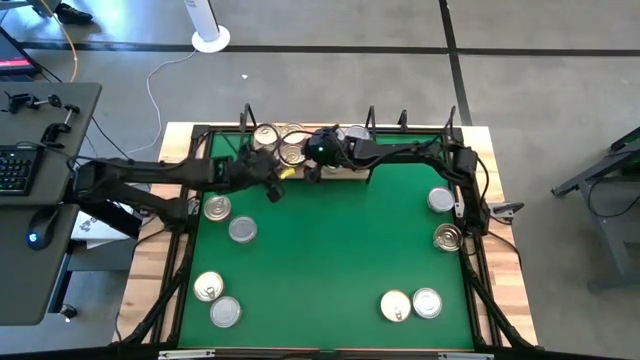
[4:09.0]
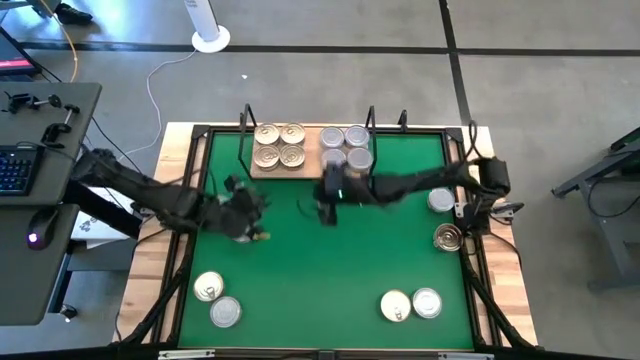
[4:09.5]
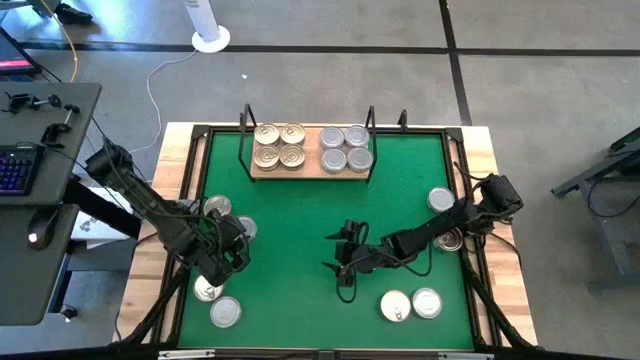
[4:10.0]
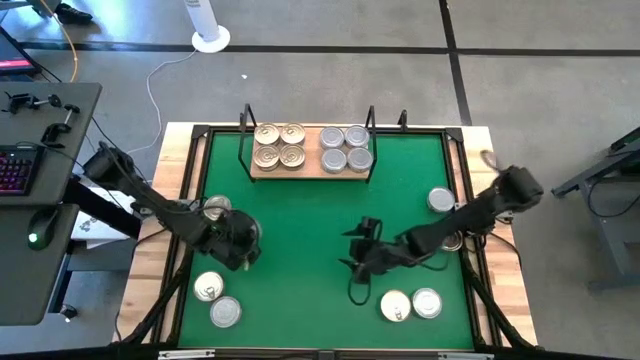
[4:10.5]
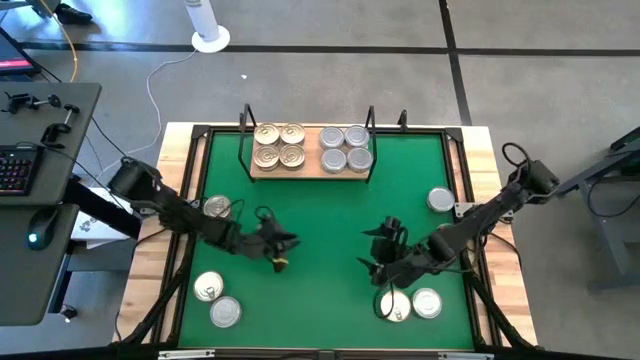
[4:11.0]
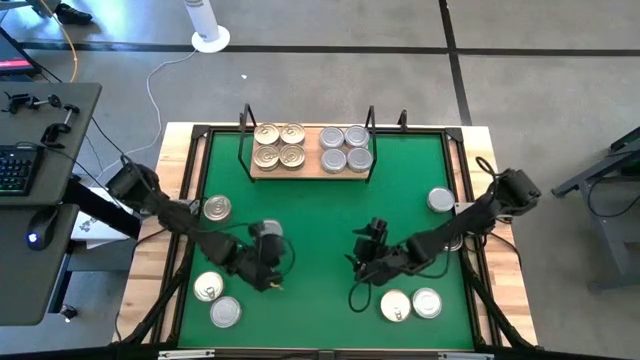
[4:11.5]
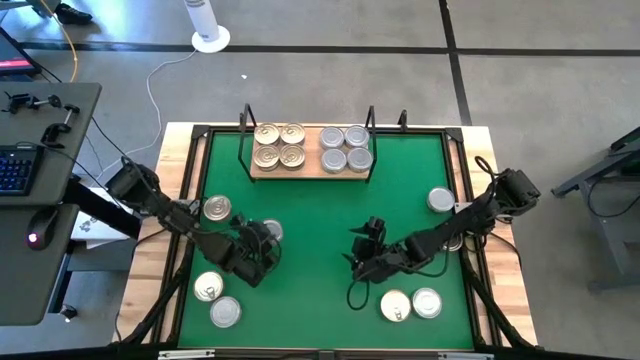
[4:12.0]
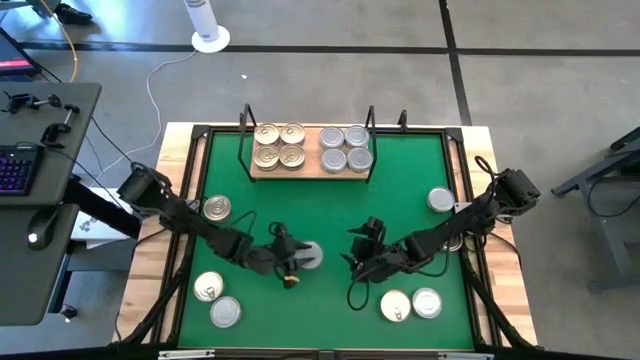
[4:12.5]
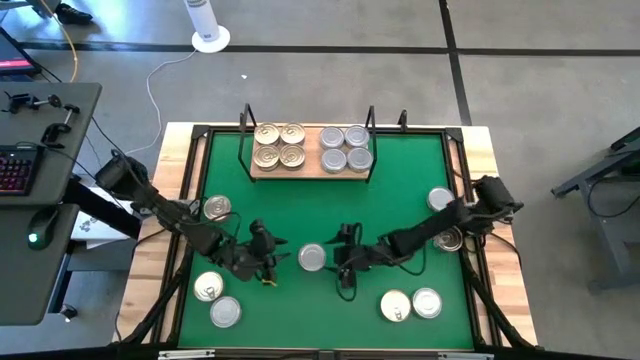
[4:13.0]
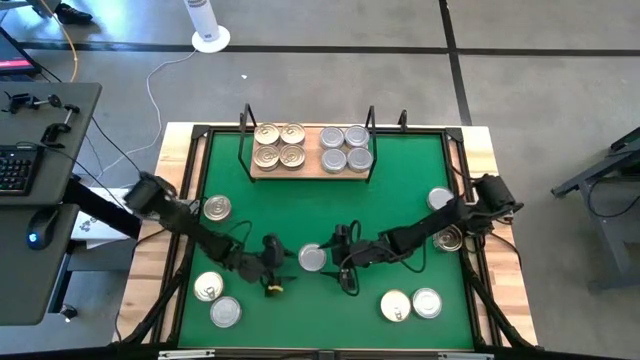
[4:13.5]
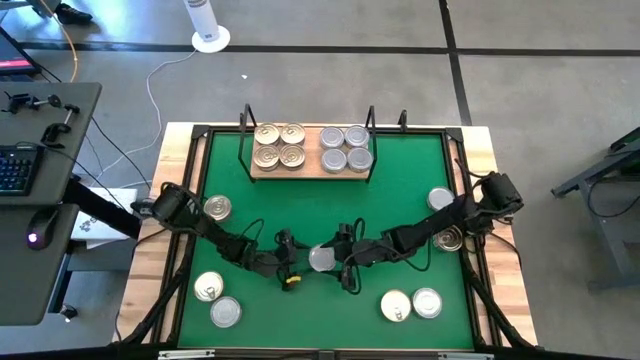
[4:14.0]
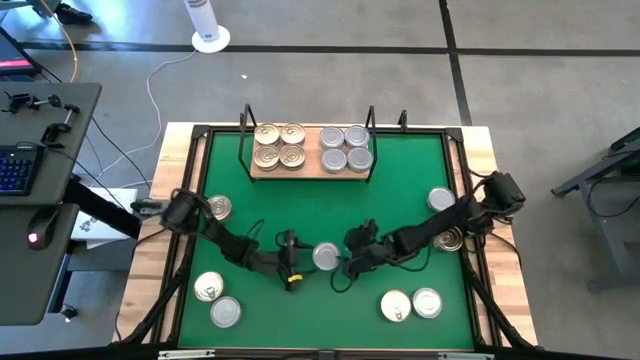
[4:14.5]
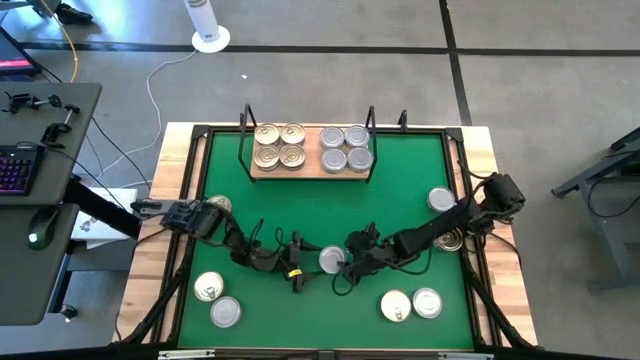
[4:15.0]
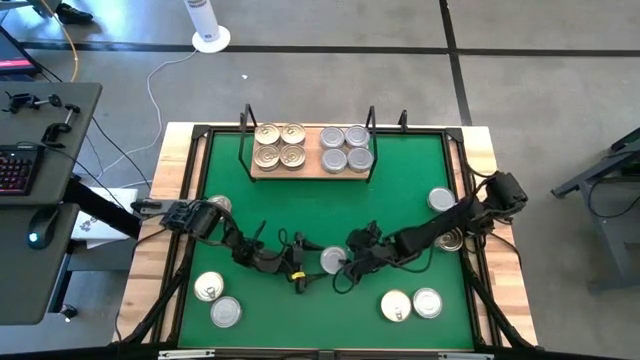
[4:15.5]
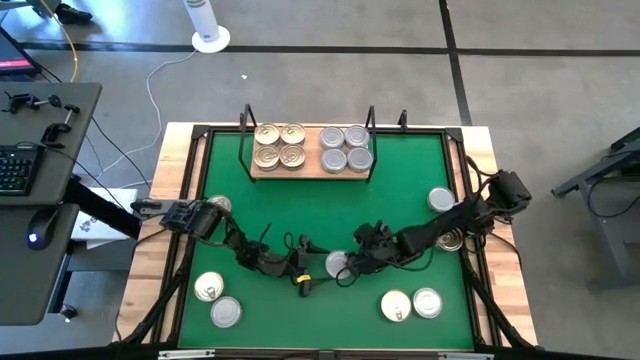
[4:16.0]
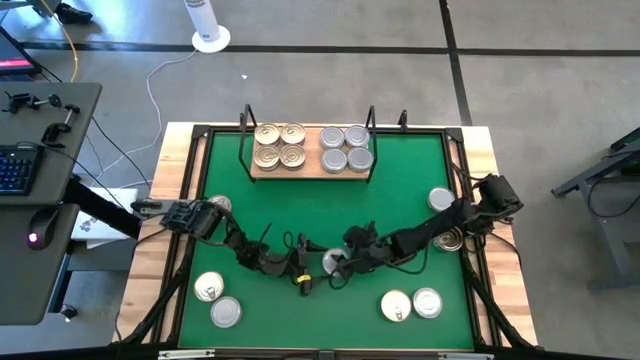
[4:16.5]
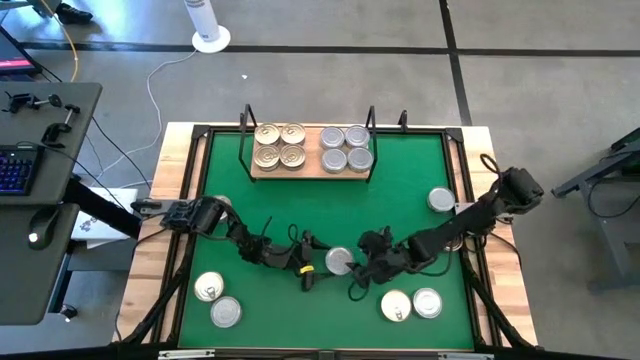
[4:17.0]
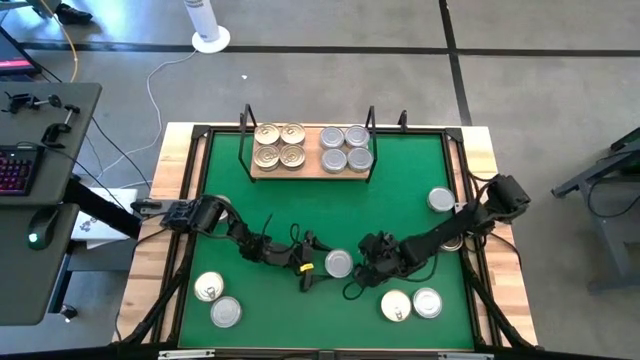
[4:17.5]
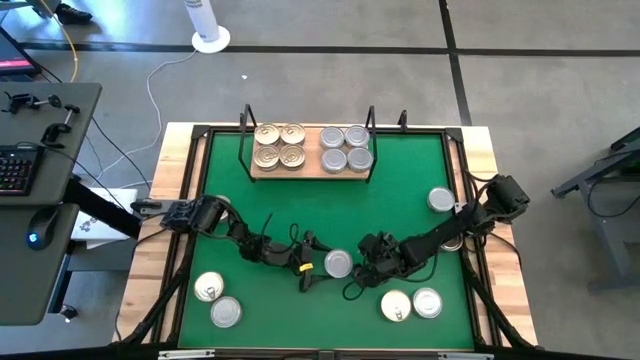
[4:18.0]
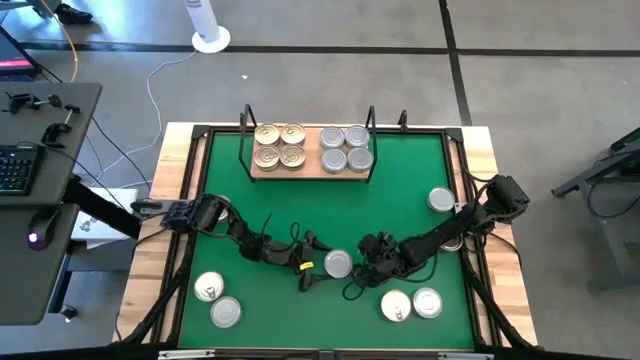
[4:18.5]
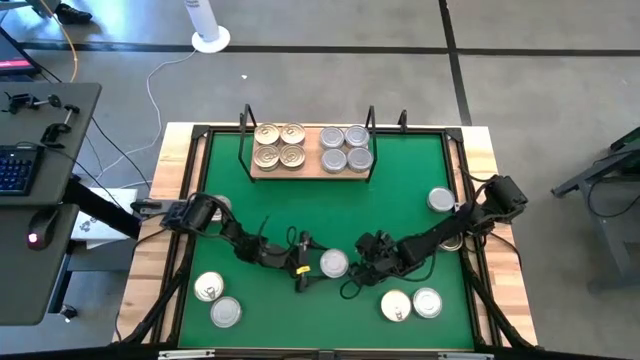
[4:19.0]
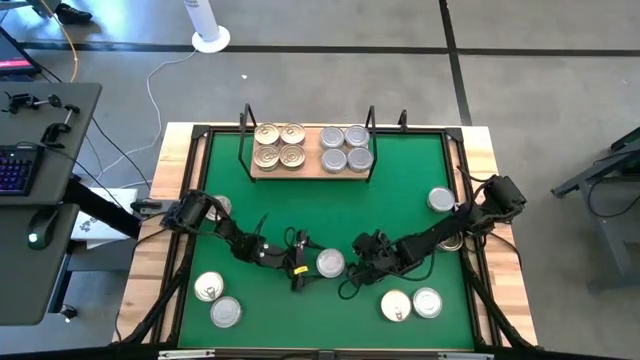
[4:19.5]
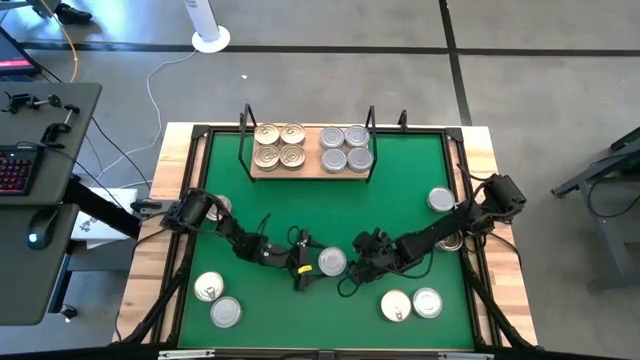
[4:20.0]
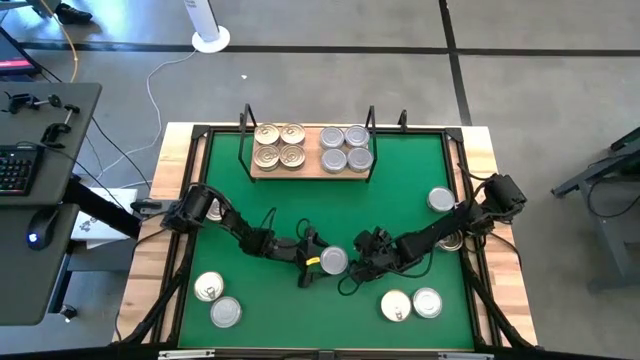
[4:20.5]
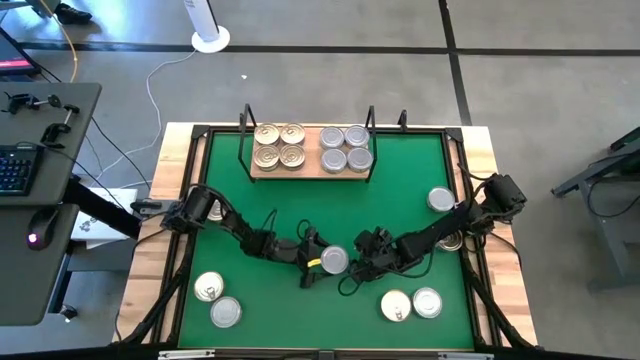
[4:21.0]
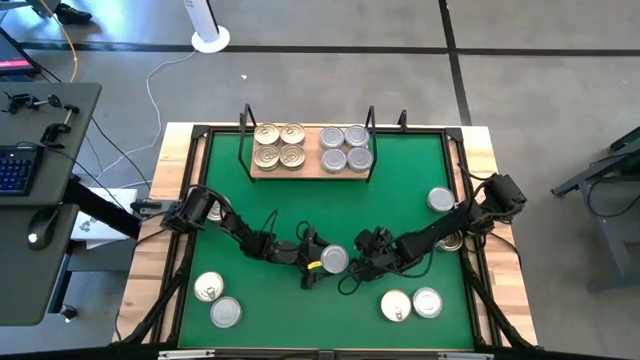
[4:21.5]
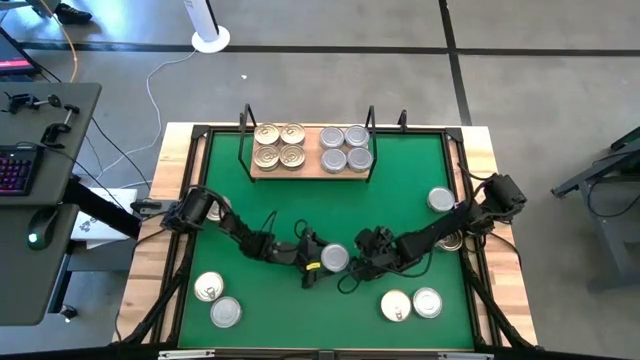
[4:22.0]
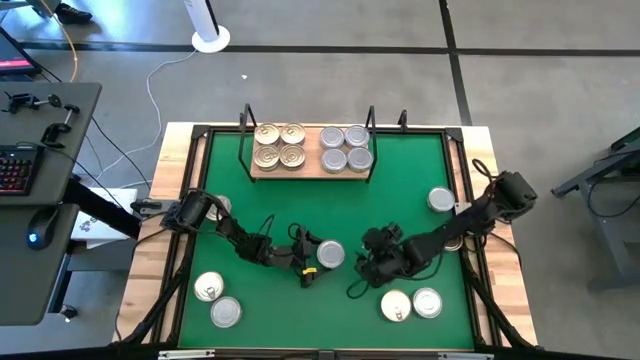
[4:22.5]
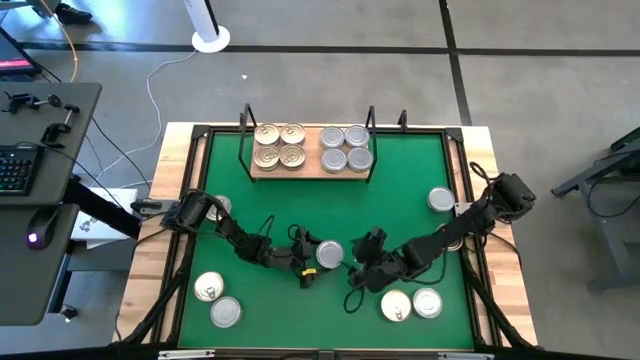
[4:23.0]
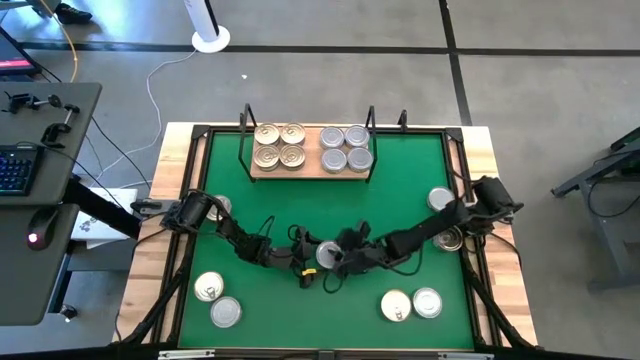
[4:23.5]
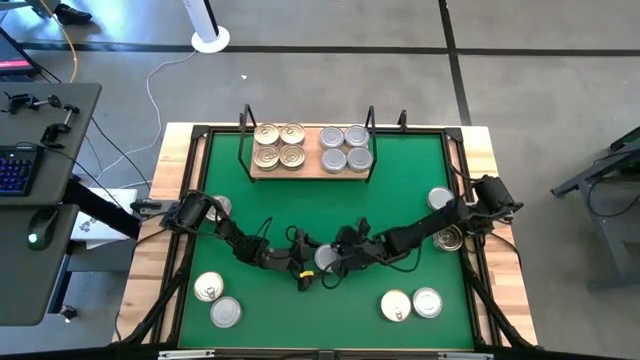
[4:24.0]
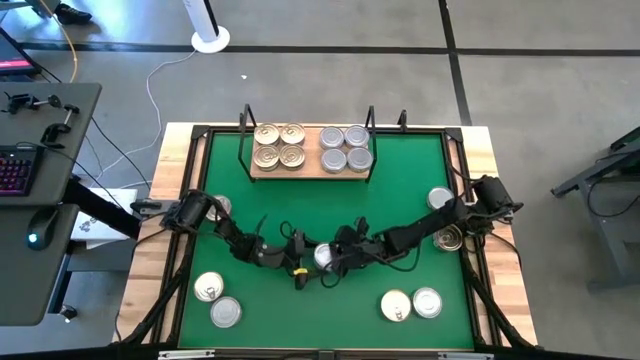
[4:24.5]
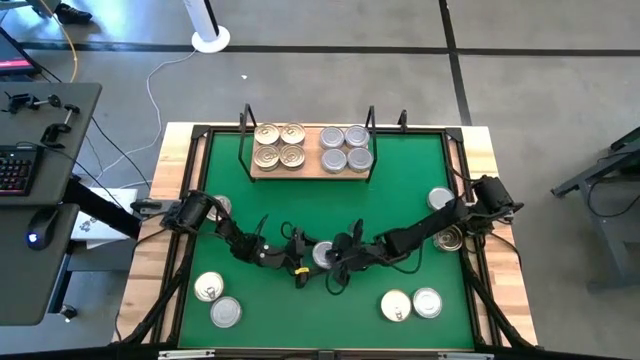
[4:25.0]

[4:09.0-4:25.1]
Task: Stack canned seafood by type on shelf
Stack the green tuna can on top of the other green tuna can on the shelf

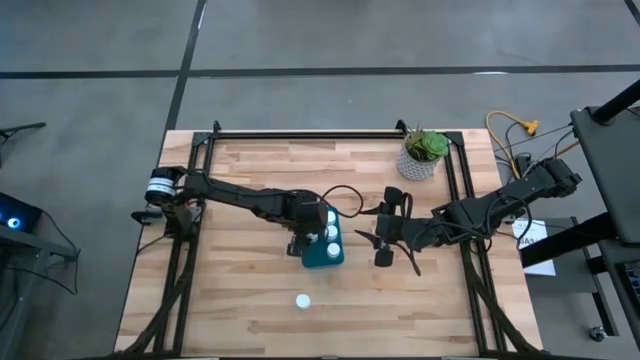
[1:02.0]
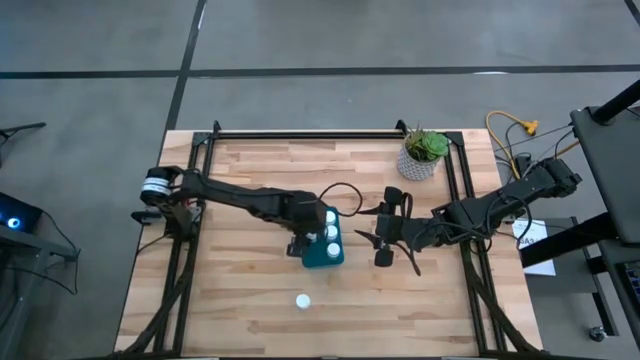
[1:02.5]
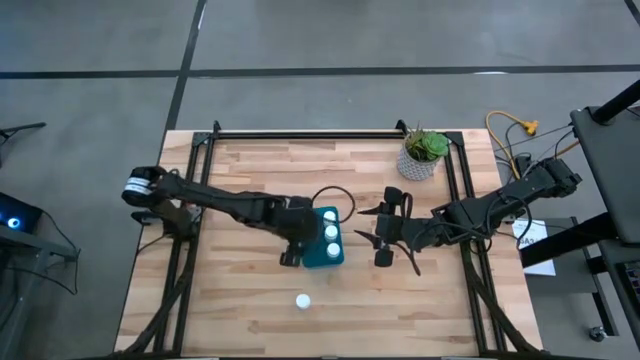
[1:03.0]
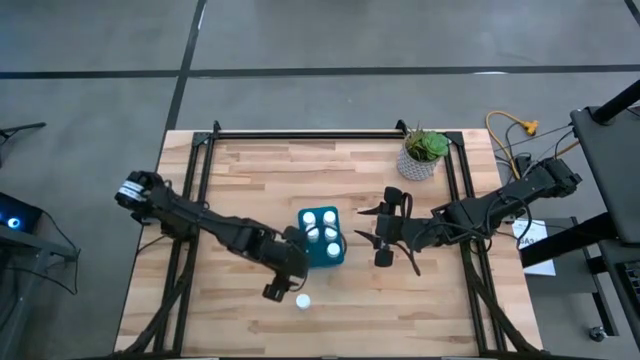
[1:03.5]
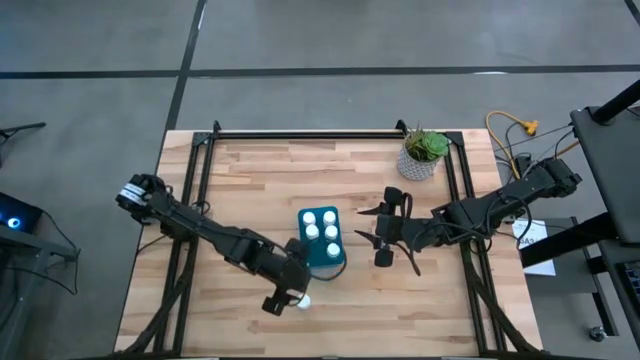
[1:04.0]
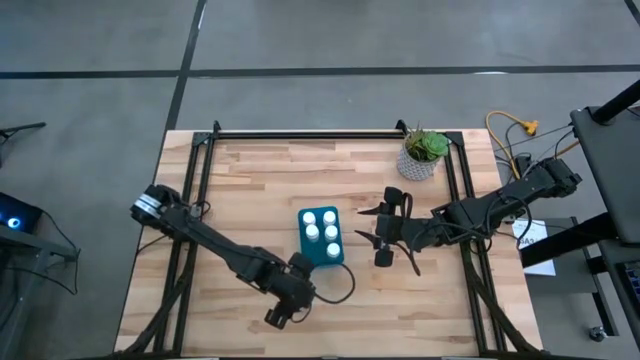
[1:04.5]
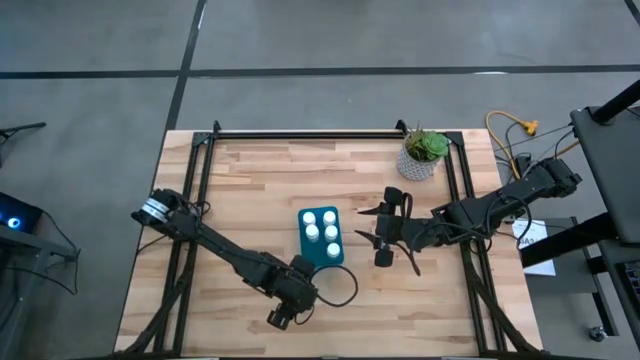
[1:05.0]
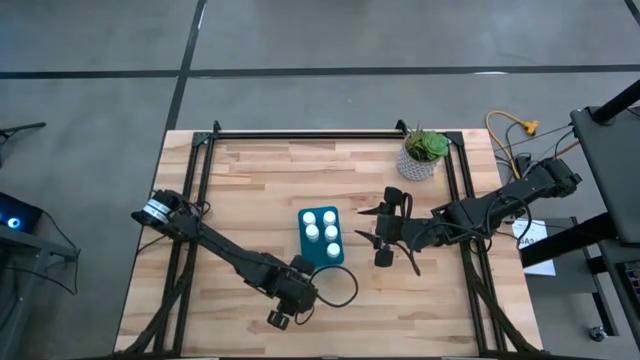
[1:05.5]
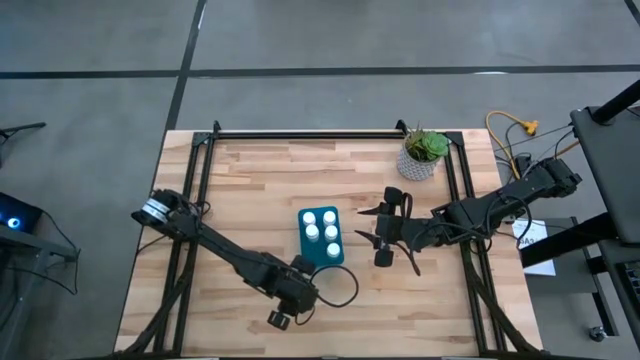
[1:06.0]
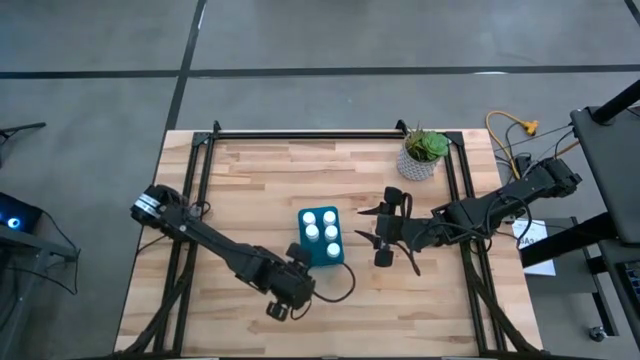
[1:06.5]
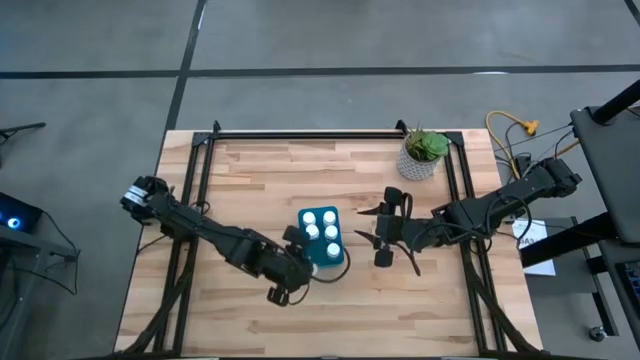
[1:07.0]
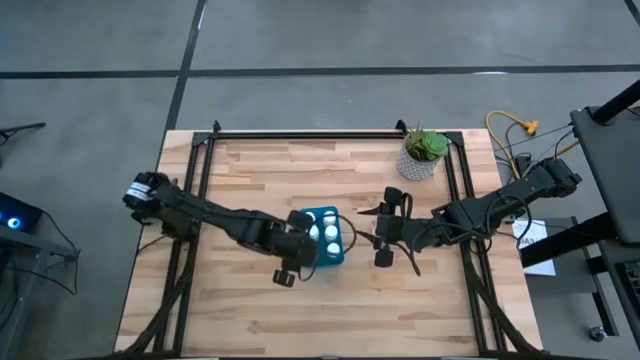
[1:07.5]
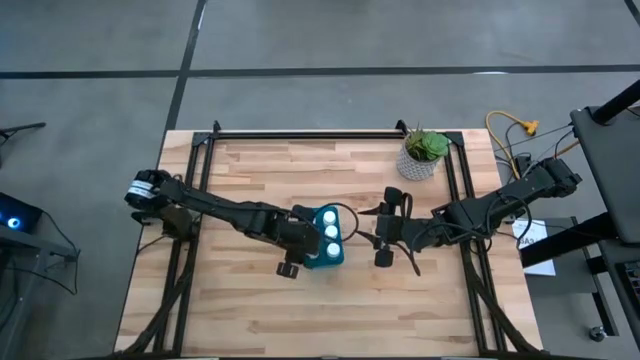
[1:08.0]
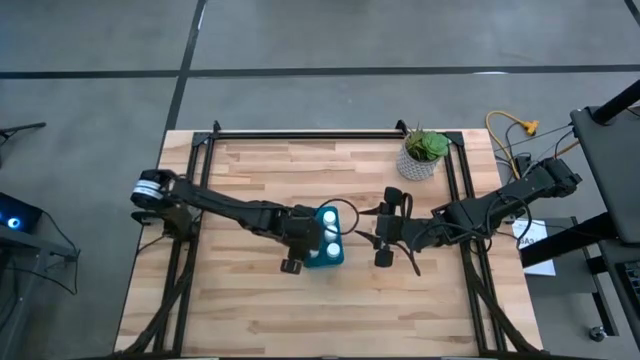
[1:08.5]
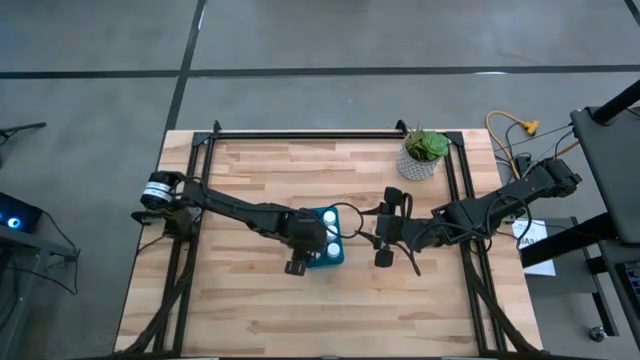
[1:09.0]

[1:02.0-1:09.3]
Task: Pick and place pill bottles into a basket
Put the white pill bottle into the blue bin
